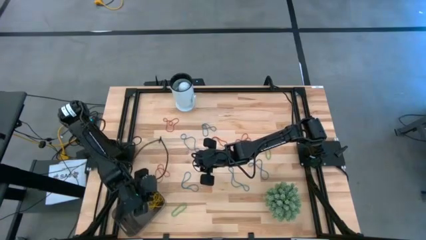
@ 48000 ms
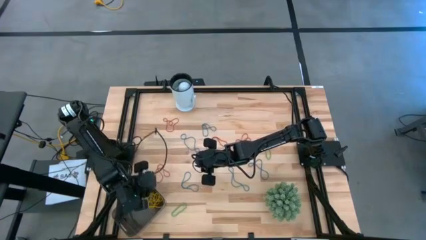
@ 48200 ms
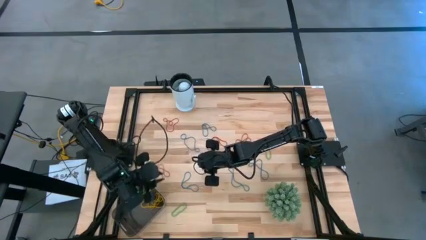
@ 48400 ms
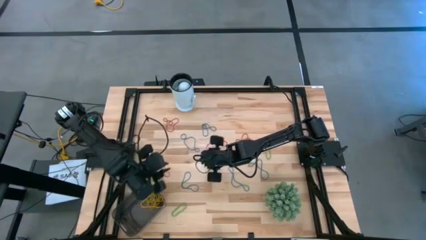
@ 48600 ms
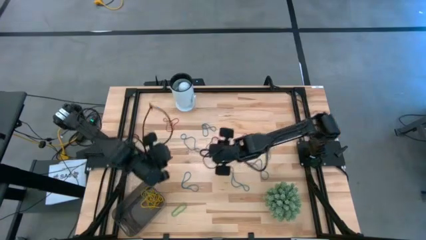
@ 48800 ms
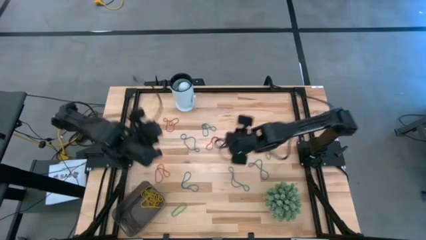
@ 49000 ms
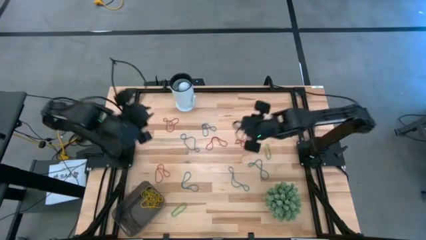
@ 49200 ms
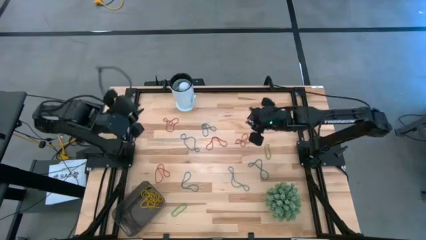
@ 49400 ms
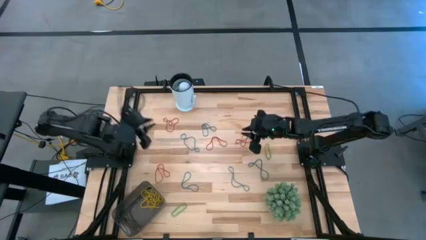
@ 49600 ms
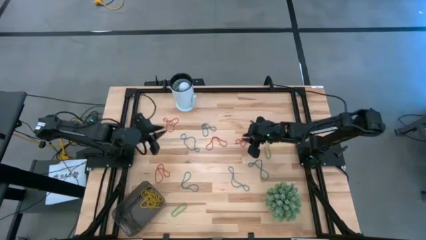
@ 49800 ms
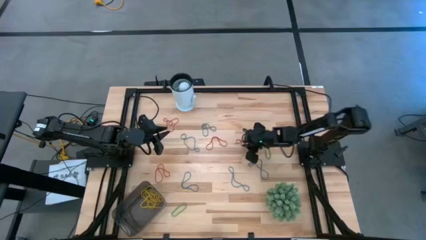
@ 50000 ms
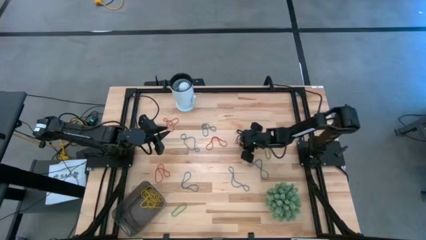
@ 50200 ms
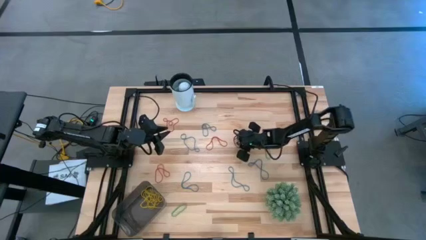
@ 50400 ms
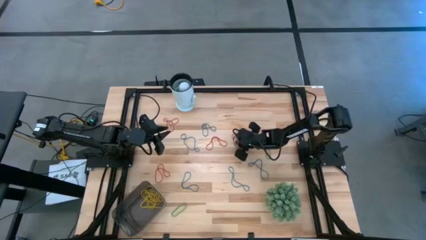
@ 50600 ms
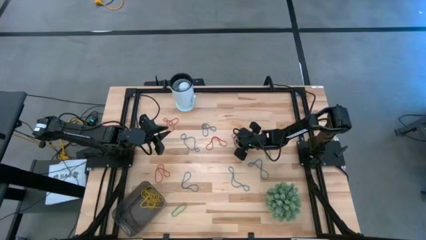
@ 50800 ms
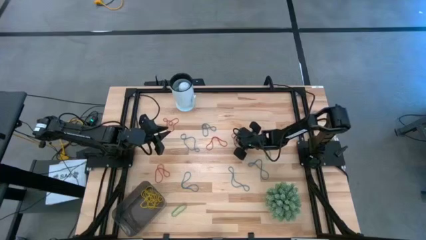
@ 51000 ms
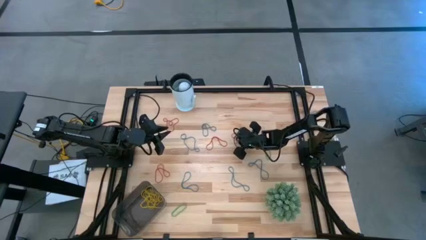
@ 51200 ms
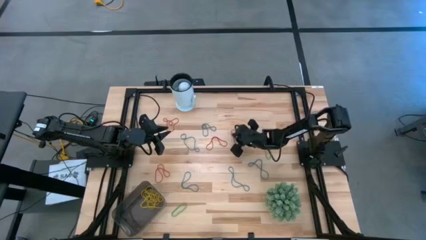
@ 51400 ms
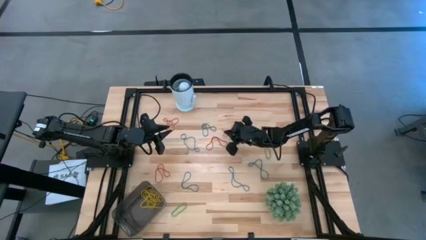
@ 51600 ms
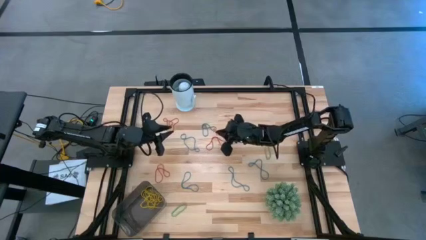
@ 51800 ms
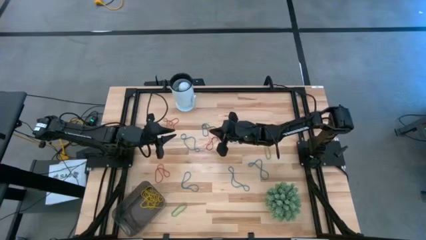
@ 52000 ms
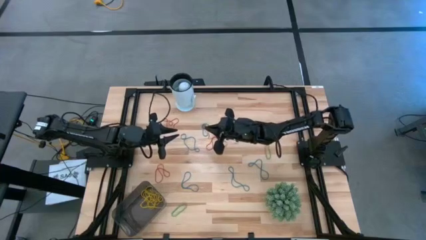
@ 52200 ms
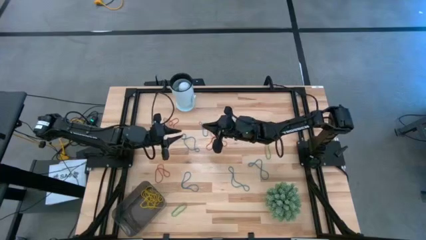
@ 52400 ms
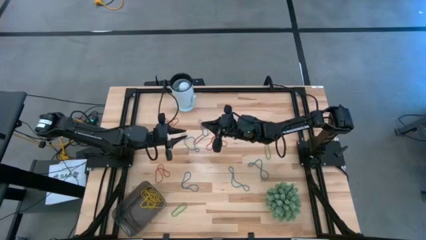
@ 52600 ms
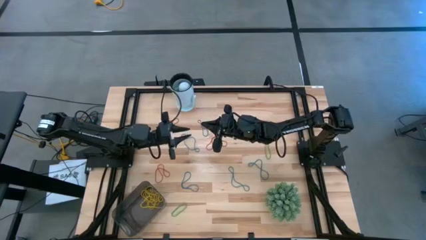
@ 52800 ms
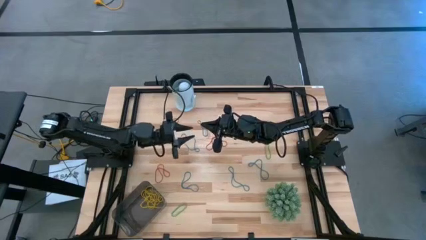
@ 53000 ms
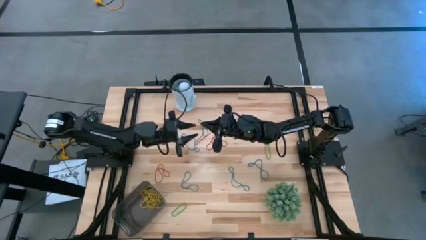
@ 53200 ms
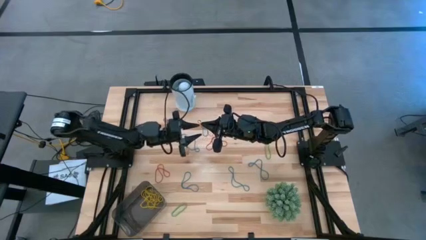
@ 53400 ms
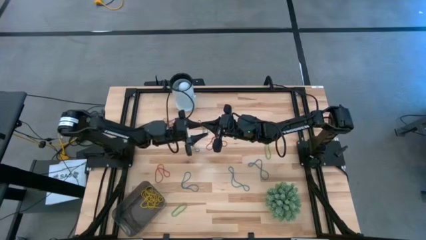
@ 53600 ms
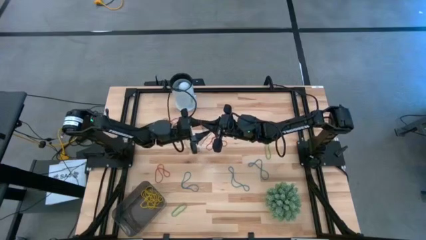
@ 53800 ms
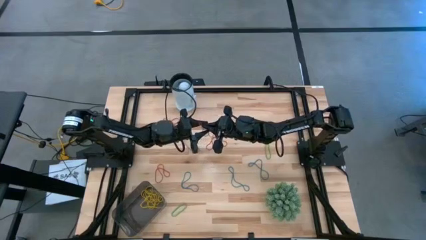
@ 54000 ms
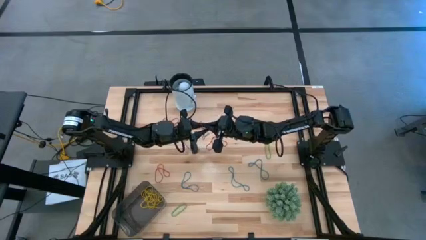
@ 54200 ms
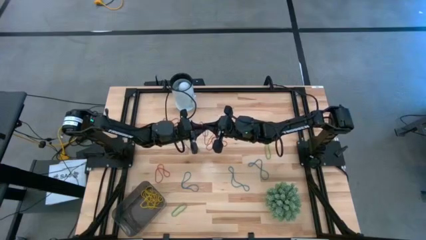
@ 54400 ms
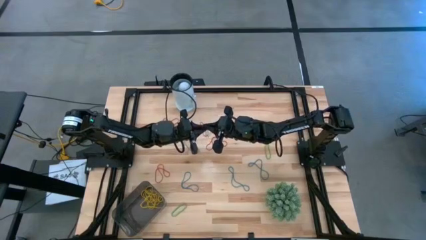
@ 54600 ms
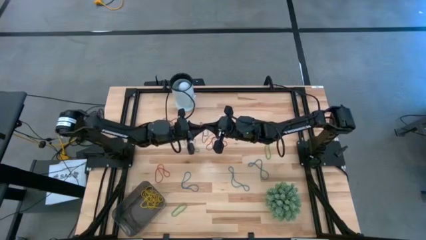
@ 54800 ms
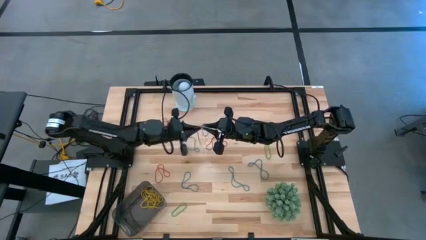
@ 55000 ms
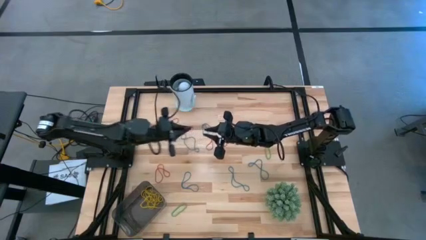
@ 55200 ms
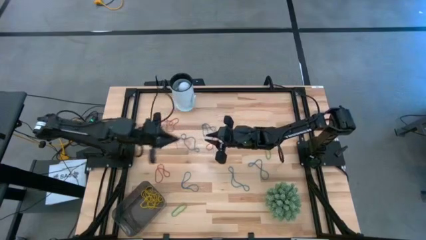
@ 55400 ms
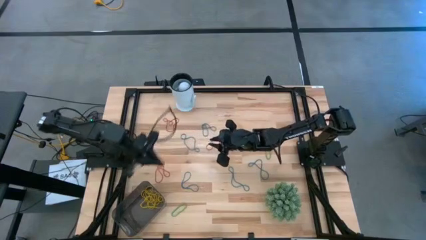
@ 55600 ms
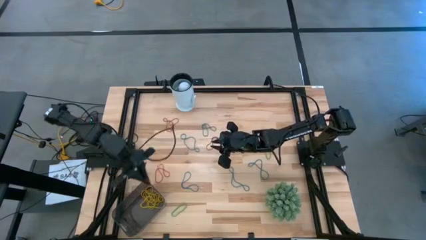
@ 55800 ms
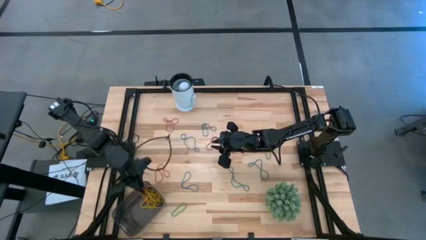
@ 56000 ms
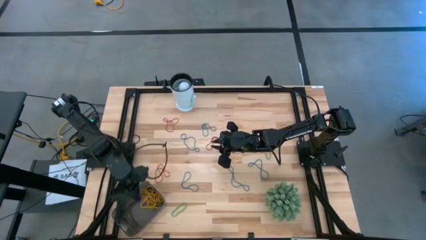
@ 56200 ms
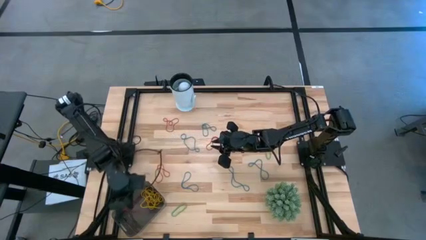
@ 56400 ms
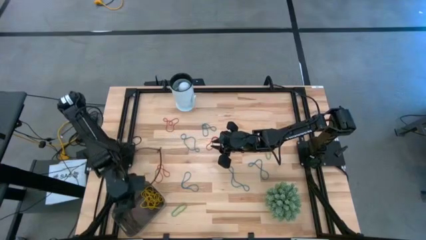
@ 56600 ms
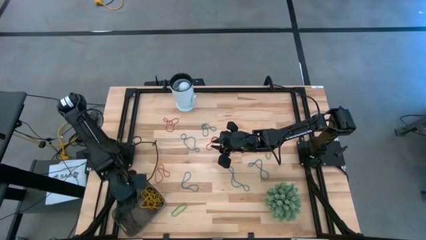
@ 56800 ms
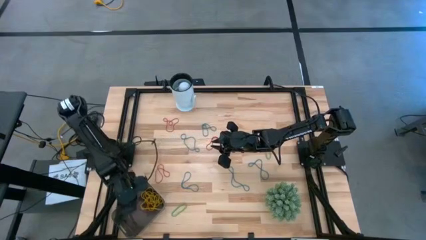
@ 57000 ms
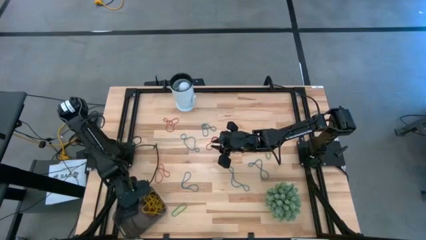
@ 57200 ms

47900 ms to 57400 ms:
Task: Pick and place items into bin
Put the red rubber band into the black bin

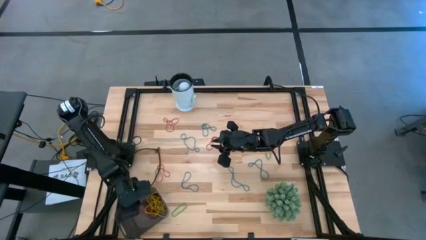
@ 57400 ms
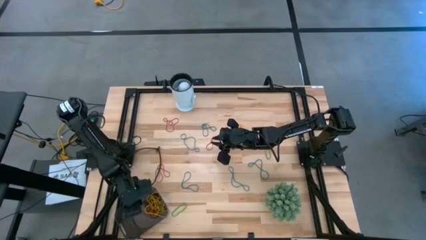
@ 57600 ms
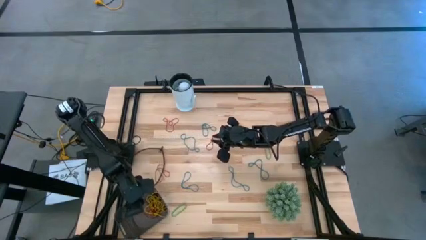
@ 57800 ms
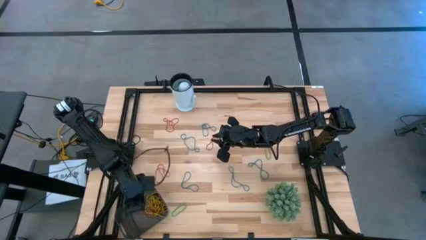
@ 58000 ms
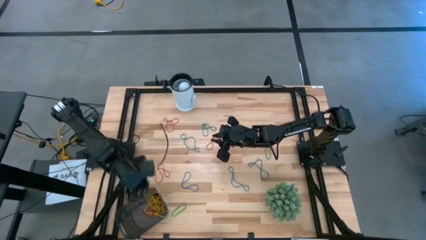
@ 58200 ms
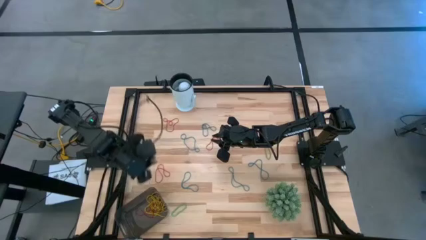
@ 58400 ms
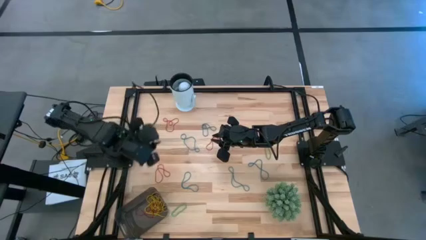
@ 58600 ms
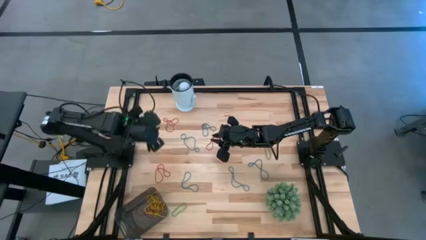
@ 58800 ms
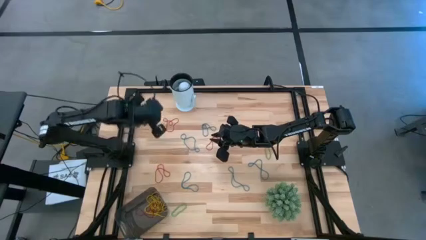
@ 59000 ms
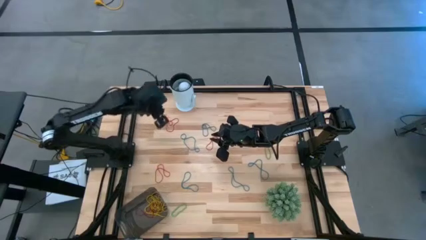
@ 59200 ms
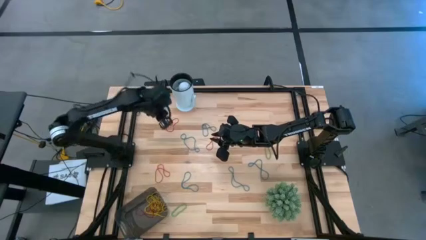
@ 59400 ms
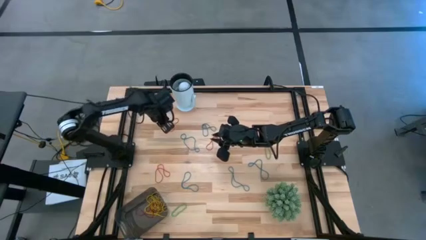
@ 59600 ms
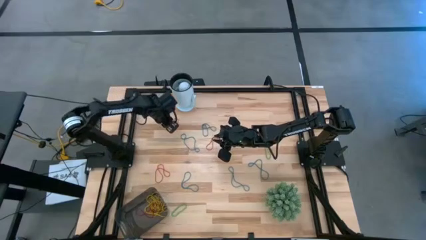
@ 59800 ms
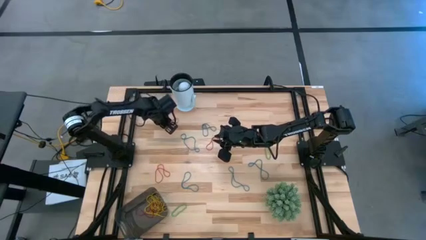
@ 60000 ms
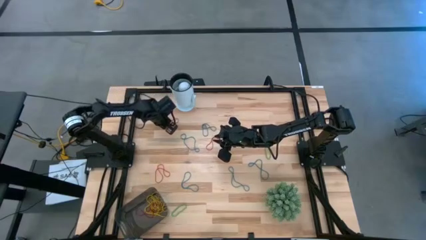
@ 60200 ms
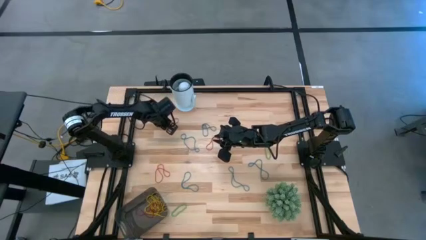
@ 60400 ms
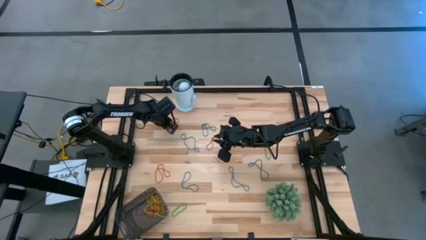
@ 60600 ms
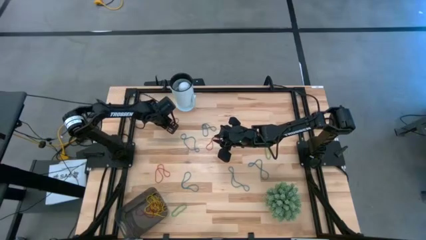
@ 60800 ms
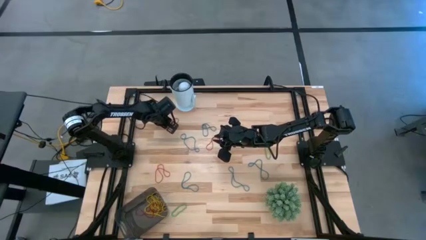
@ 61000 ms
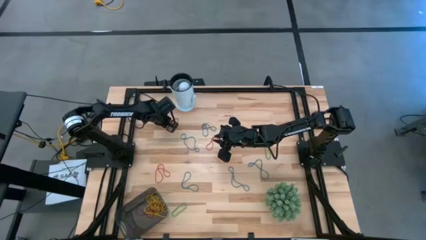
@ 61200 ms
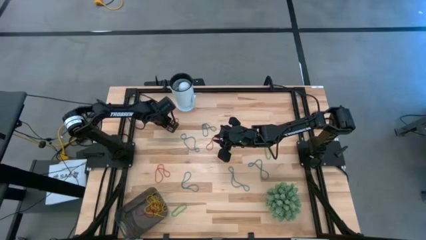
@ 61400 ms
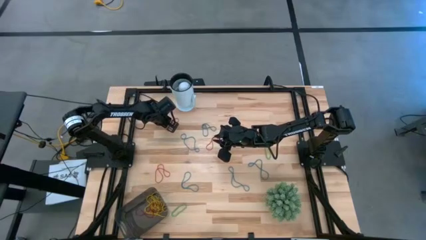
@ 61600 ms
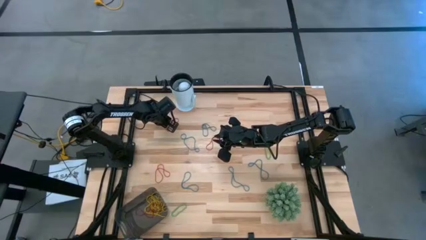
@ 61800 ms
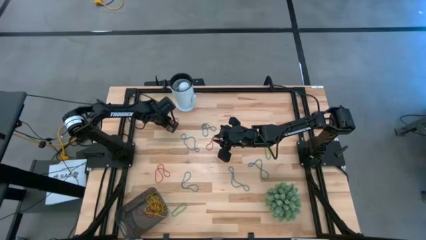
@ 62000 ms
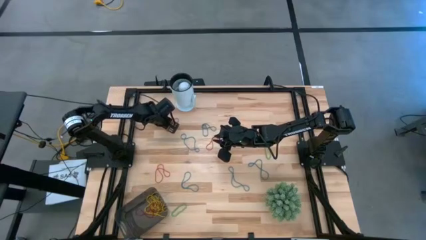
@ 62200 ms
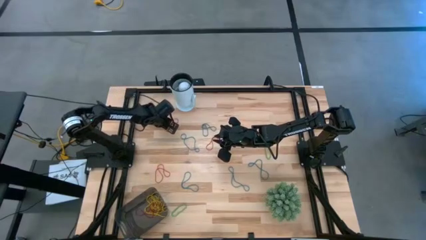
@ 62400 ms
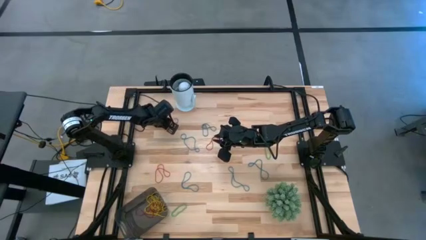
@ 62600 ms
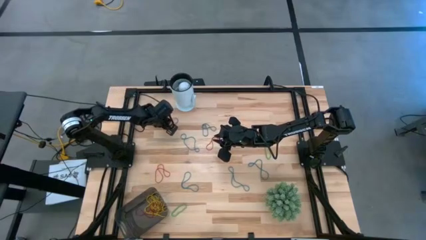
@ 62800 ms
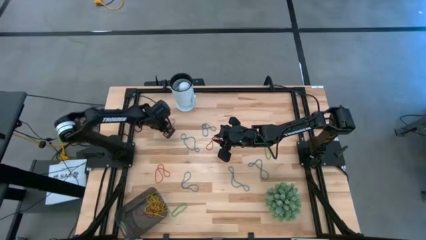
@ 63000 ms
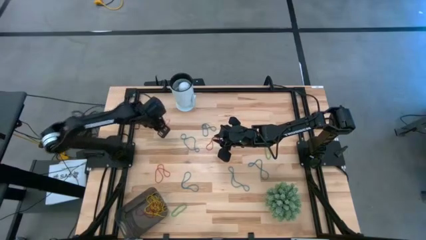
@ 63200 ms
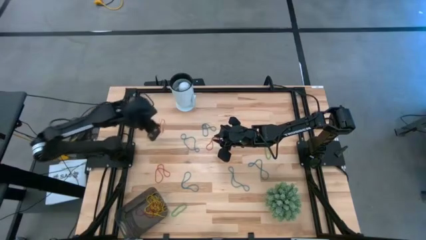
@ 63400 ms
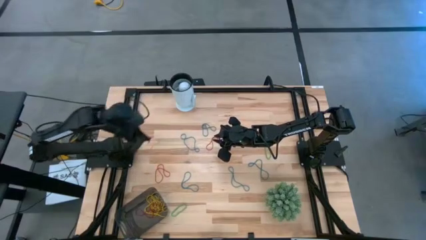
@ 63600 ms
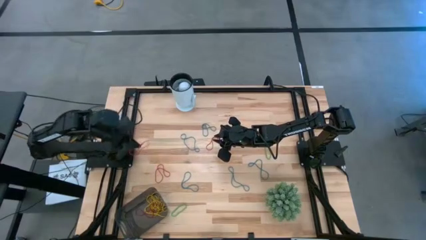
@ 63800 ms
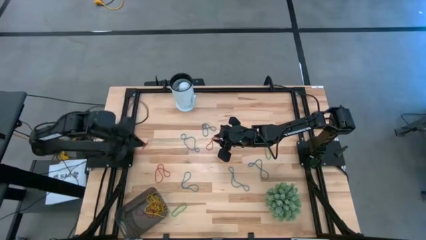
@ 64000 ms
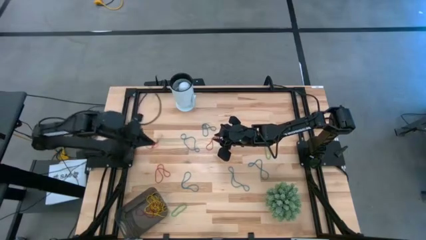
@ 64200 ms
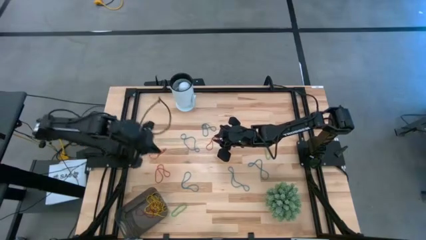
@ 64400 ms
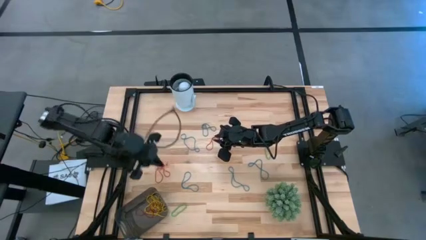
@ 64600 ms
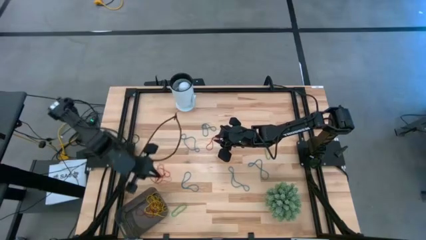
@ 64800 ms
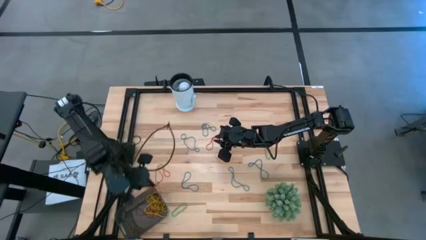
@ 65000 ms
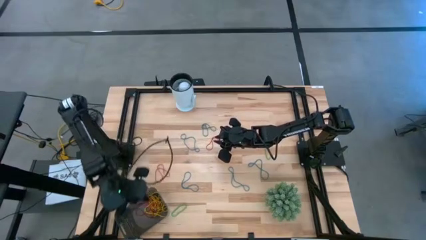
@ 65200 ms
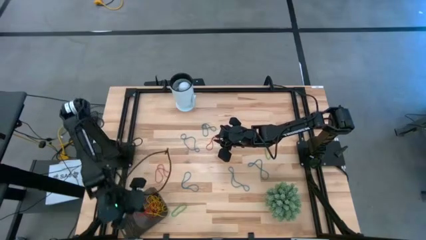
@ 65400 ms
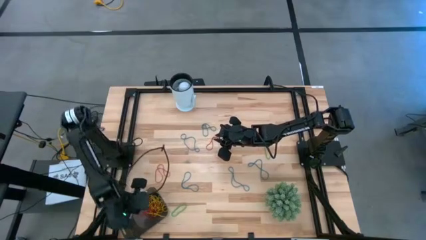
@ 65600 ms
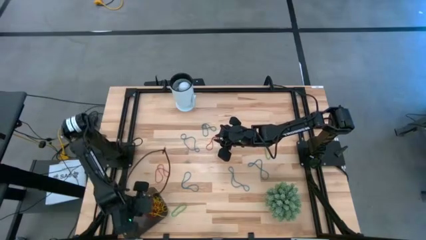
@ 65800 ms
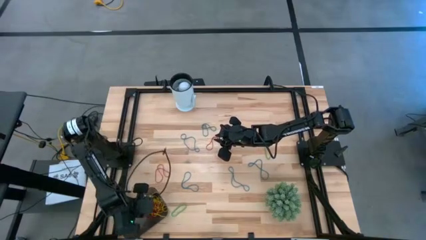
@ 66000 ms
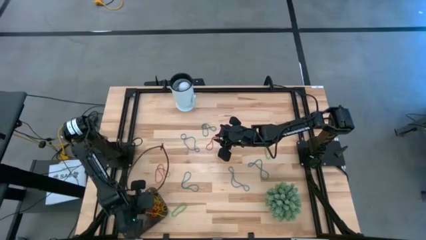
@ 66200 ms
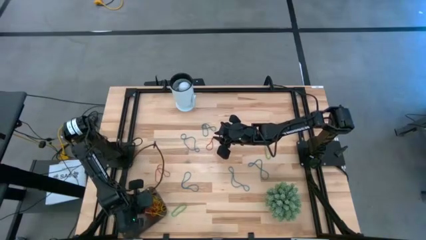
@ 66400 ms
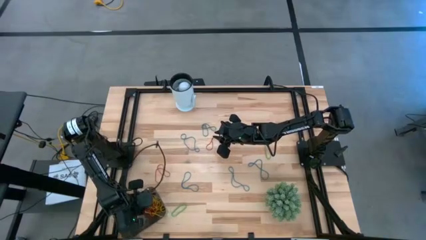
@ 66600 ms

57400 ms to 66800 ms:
Put the red rubber band into the black bin
